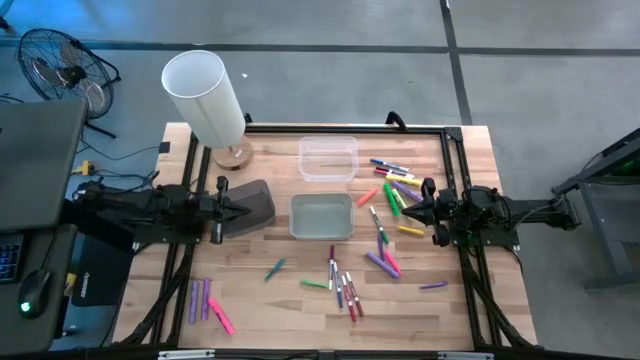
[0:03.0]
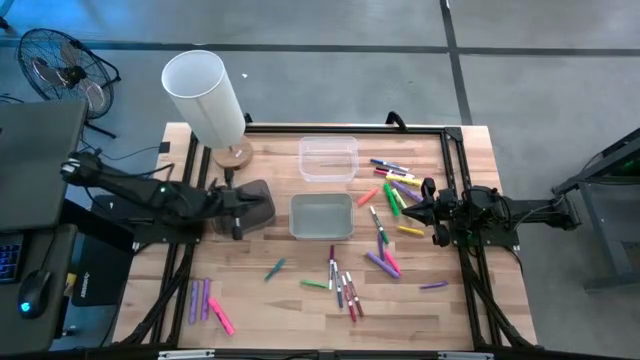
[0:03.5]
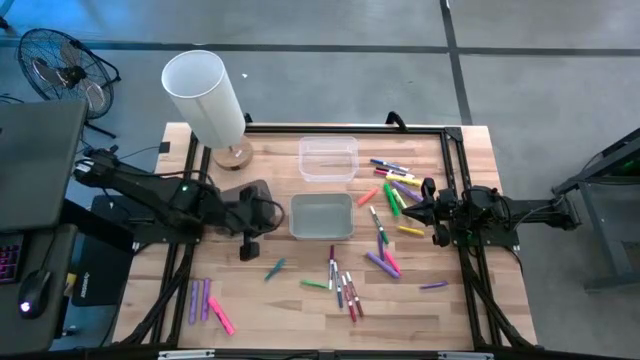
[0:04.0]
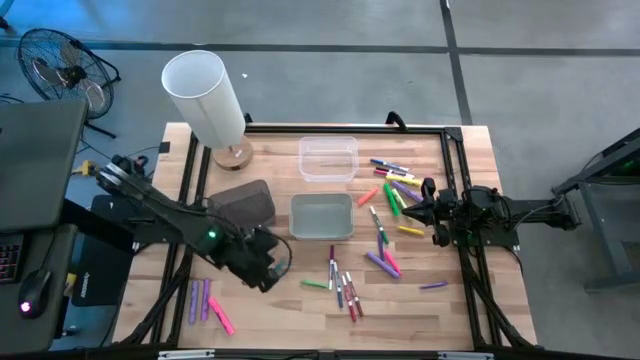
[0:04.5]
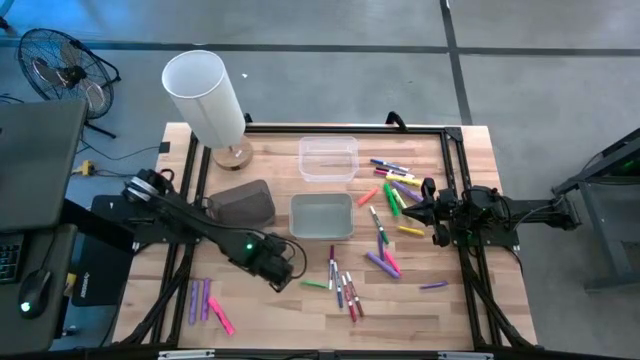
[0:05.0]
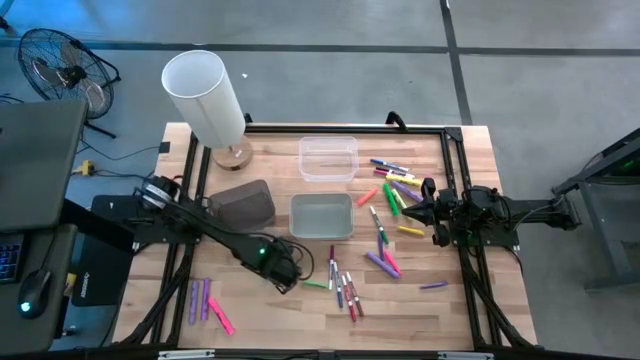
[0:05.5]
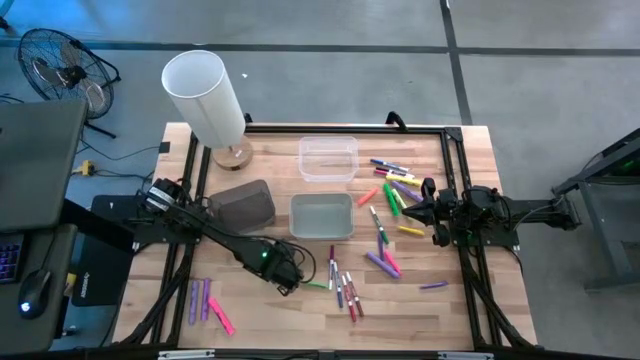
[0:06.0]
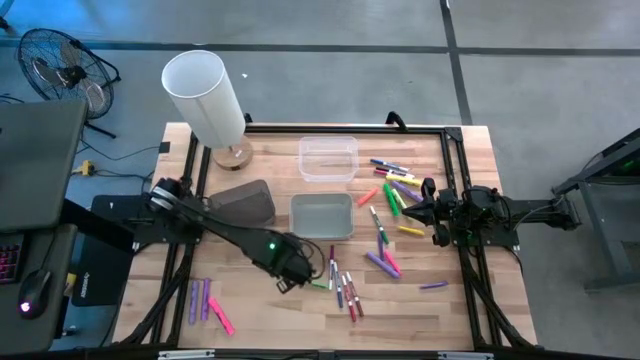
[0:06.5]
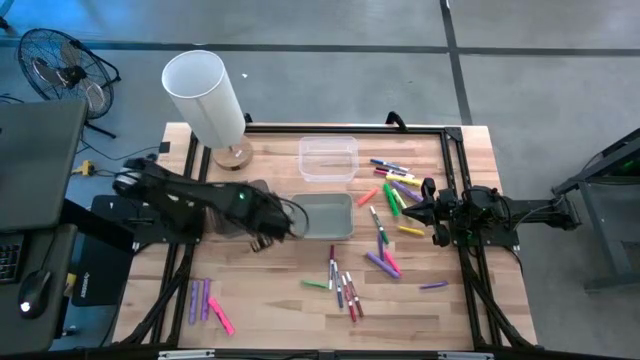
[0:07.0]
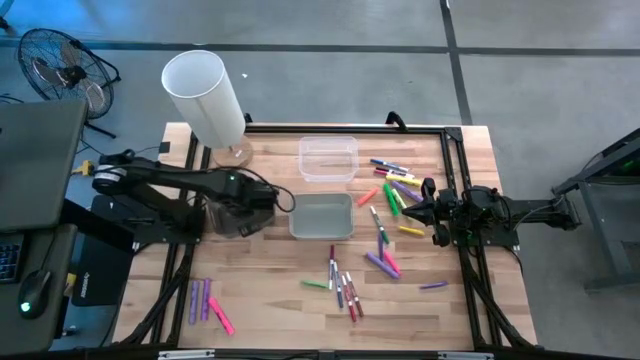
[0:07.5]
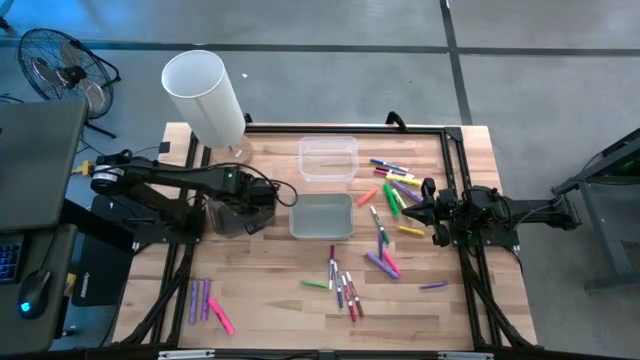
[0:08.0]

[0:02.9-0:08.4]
Task: Pick & Place Markers
Put the blue pen into the black bin

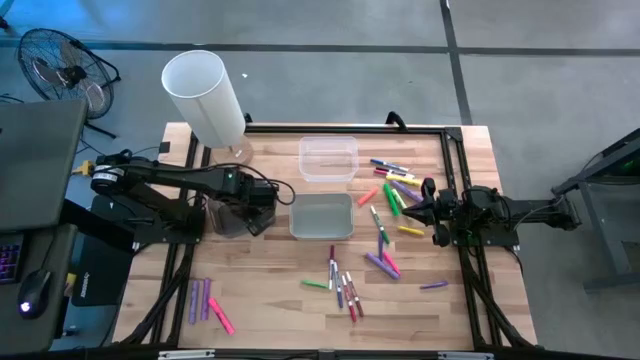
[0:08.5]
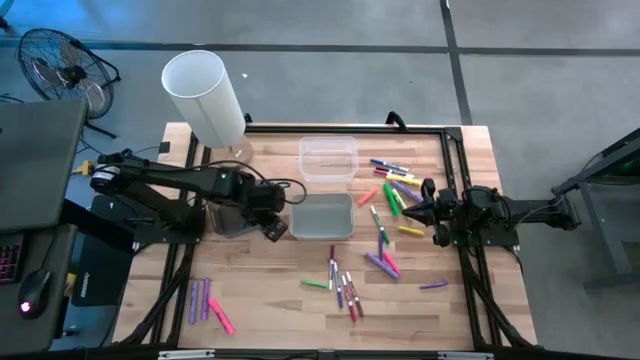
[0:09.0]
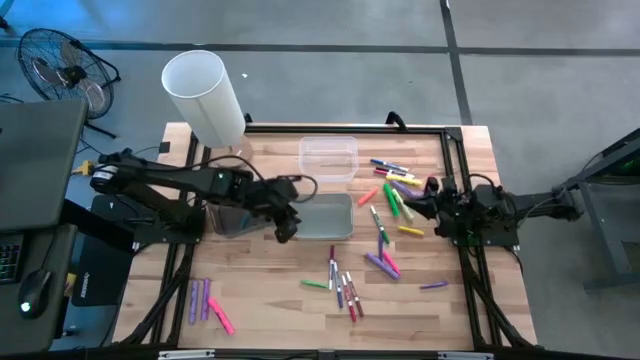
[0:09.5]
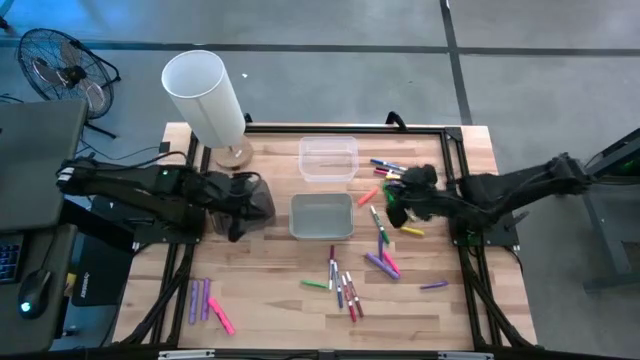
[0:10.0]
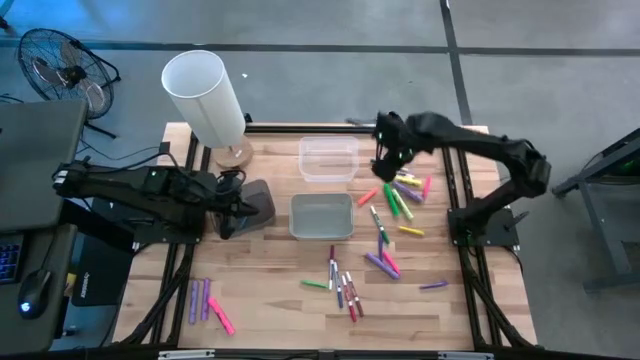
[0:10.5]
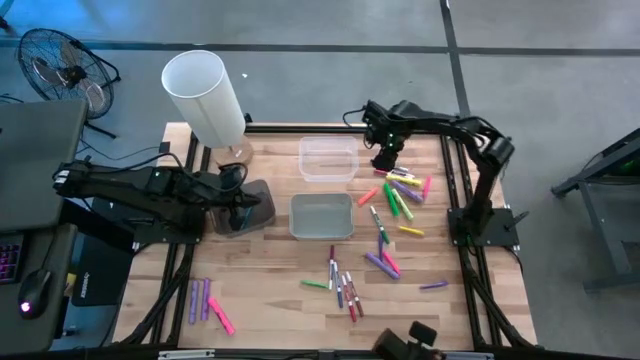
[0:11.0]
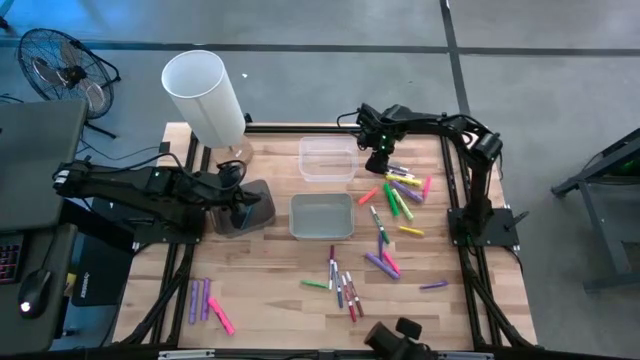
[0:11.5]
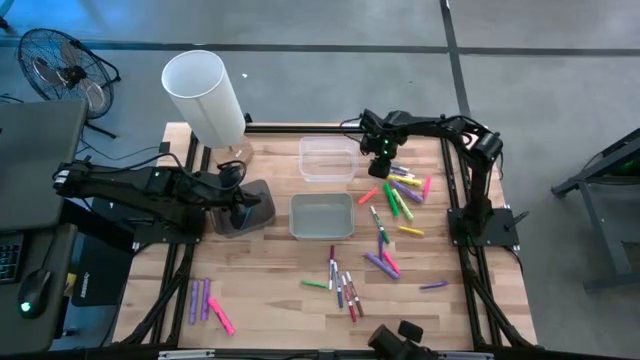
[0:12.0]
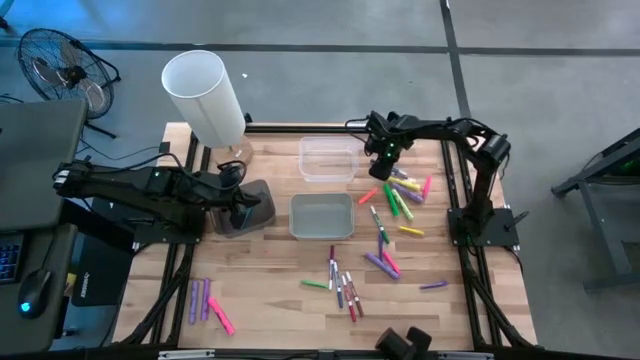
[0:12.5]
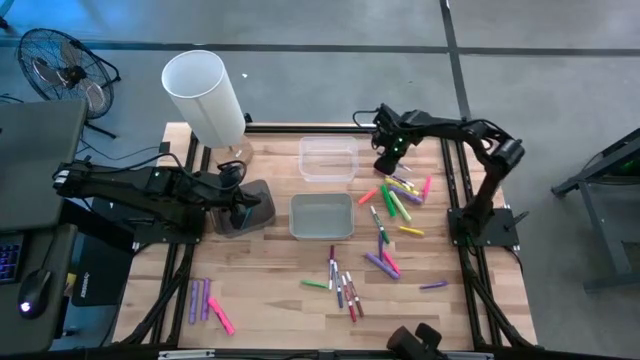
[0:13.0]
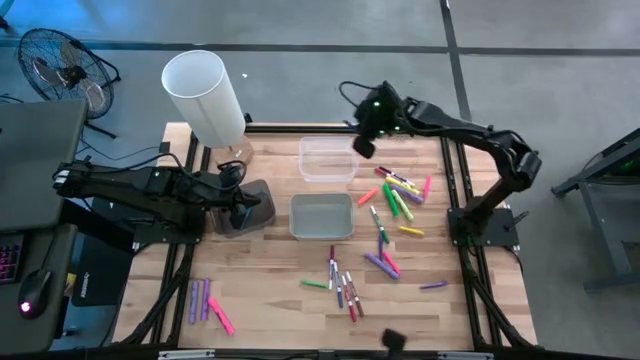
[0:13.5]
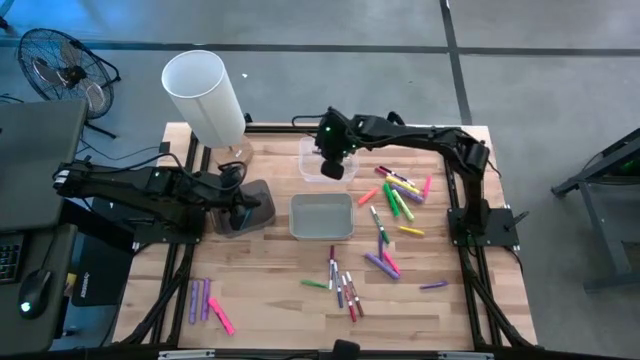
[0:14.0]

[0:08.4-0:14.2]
Put the blue marker pen into the transparent bin

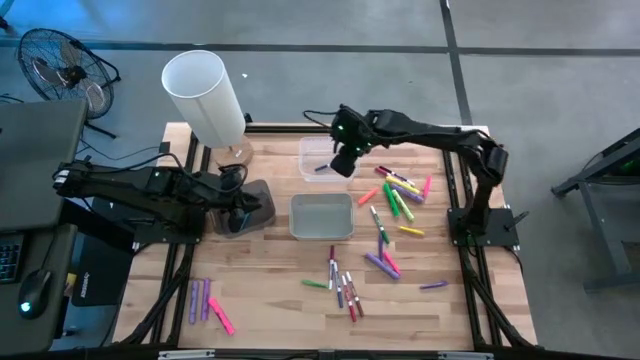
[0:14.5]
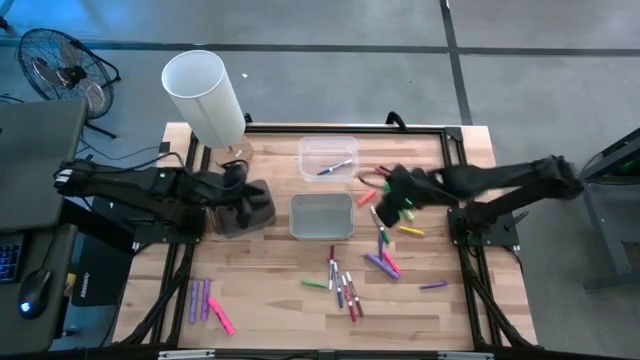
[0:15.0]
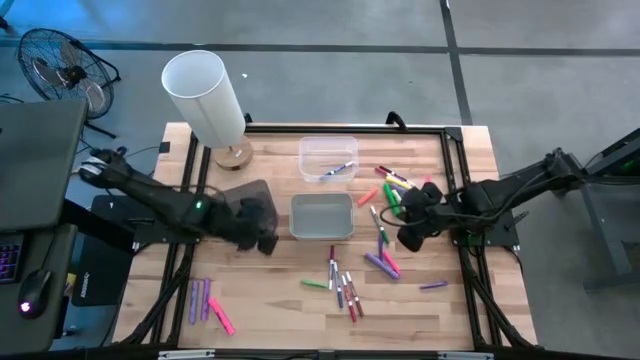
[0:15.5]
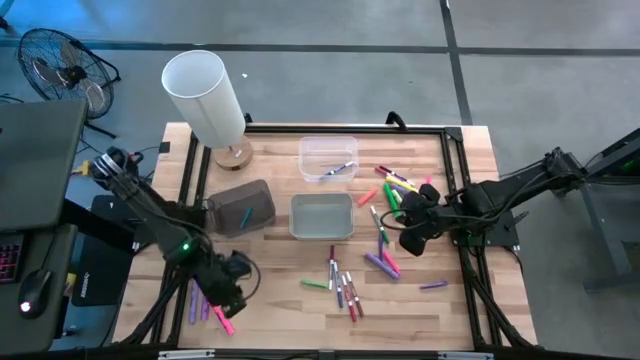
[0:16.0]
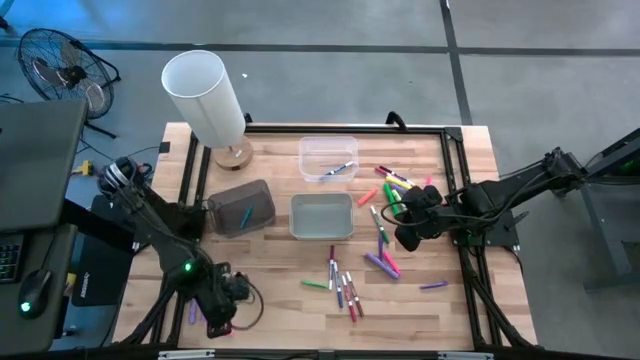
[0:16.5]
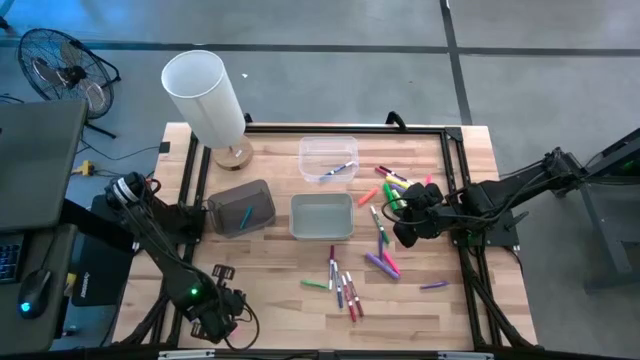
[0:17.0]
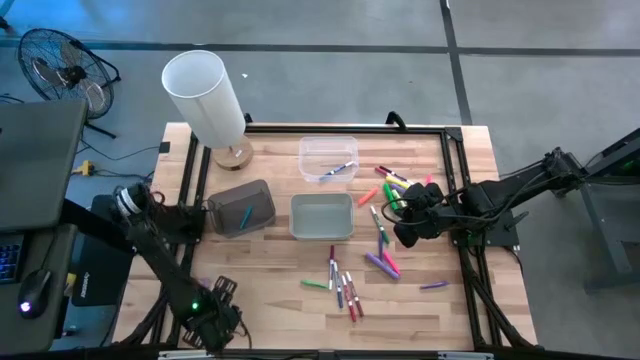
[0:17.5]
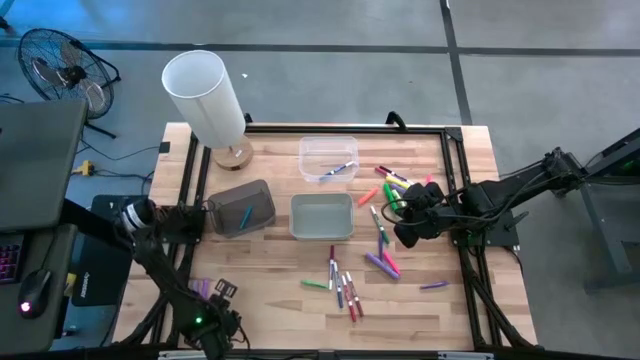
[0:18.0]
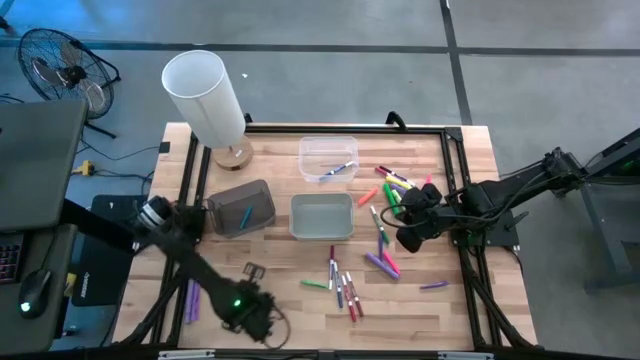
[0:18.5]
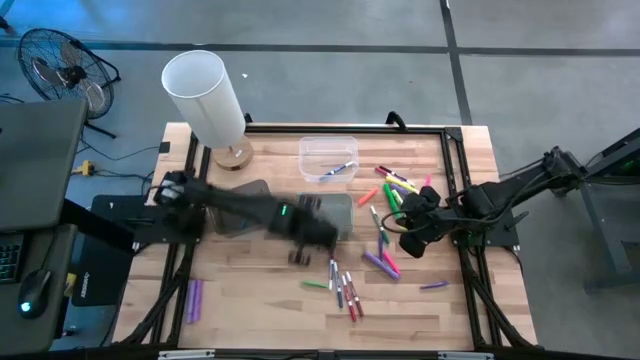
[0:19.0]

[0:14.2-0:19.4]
Put the pink highlighter pen into the gray bin

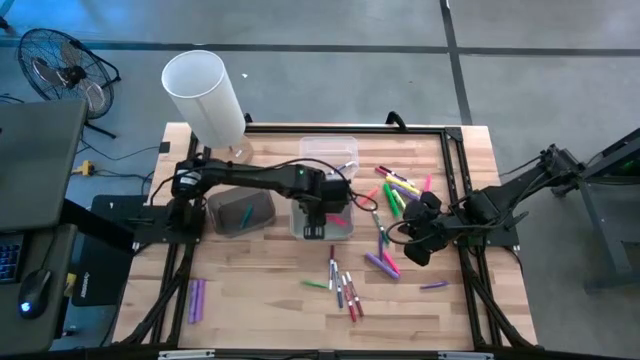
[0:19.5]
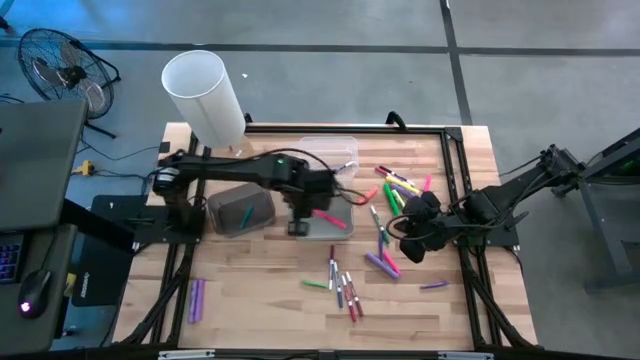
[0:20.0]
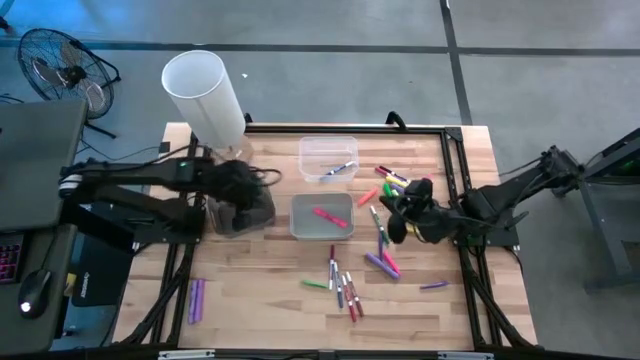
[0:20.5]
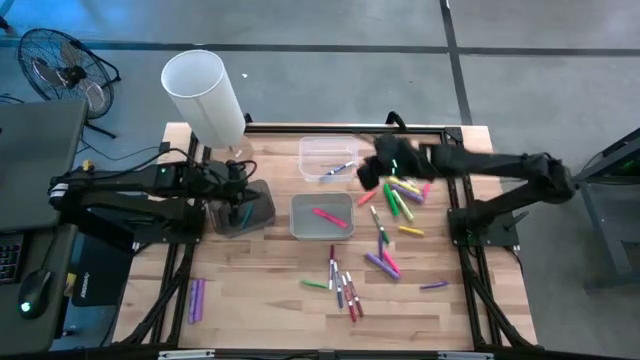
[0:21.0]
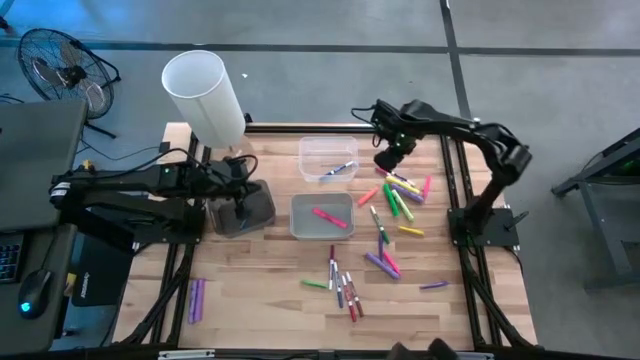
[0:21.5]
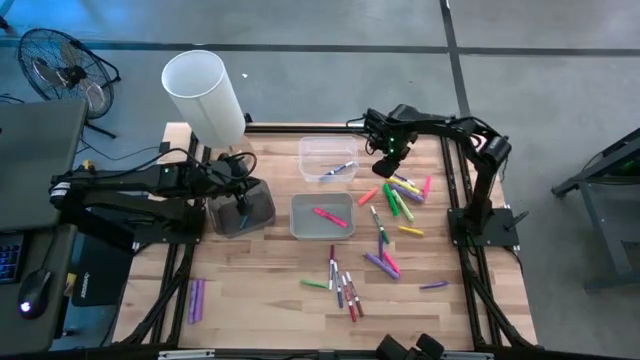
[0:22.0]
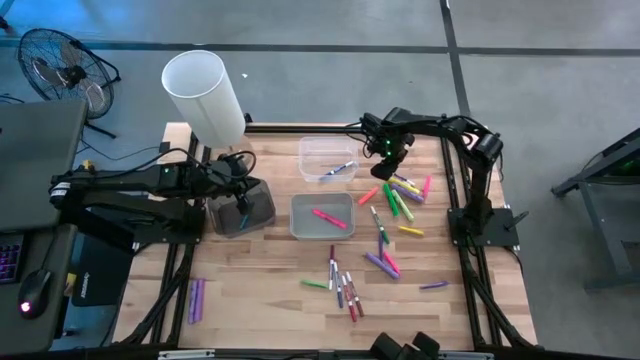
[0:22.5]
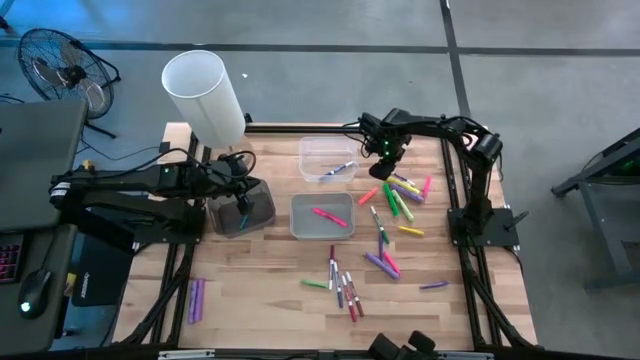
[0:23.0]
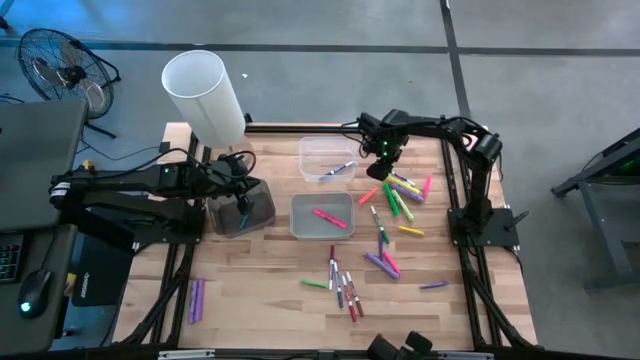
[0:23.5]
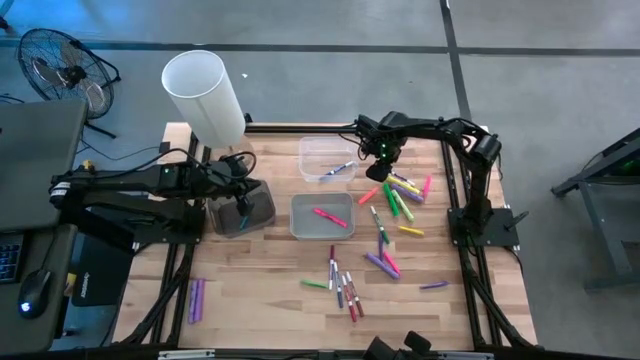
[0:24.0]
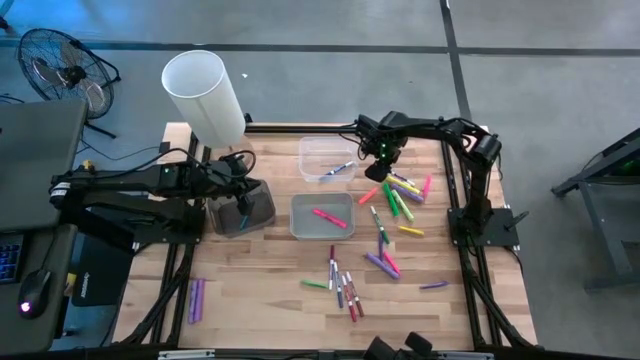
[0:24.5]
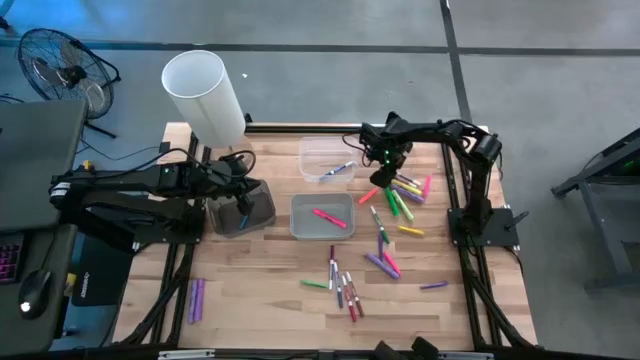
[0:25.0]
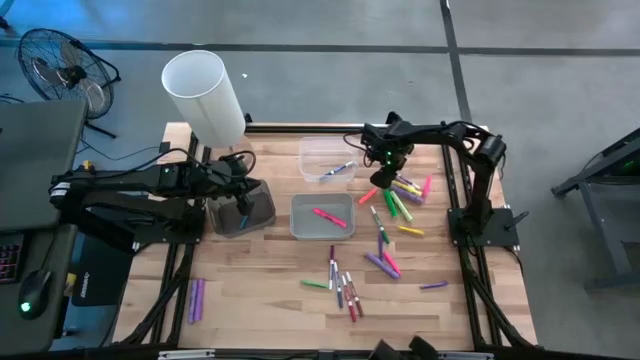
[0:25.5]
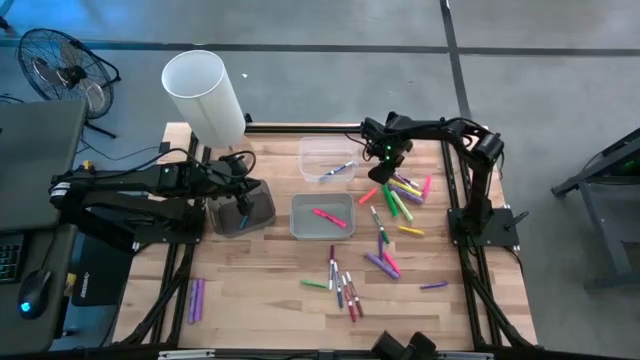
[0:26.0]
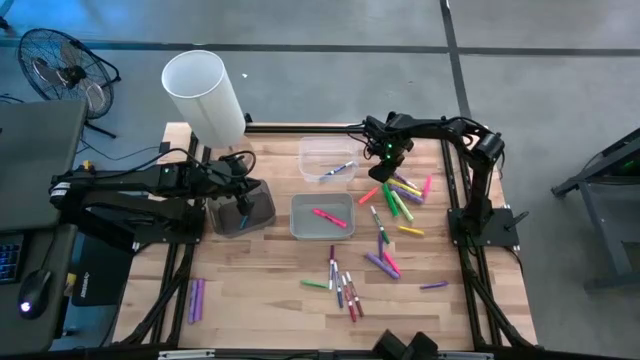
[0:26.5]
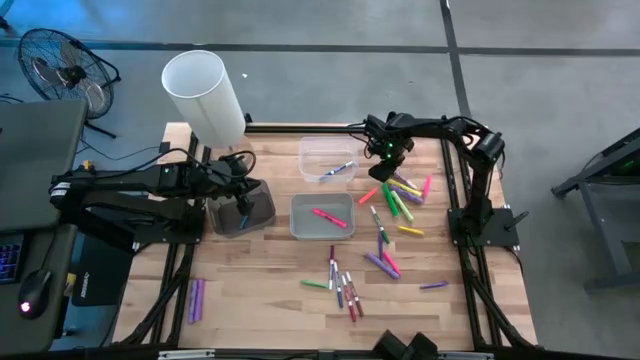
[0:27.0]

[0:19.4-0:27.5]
Put the pink marker pen into the transparent bin
